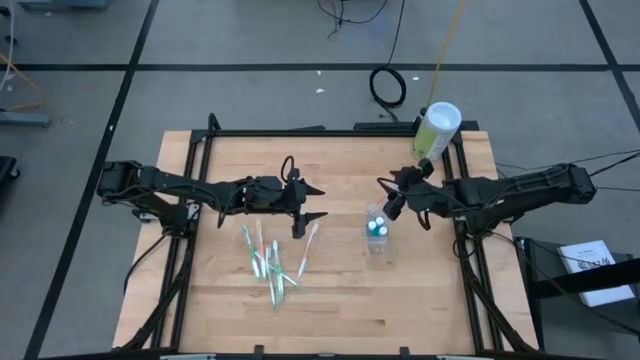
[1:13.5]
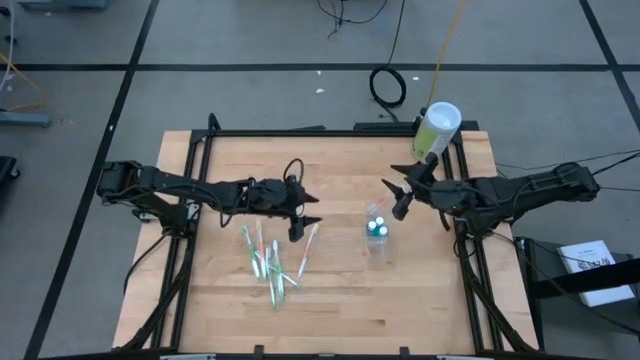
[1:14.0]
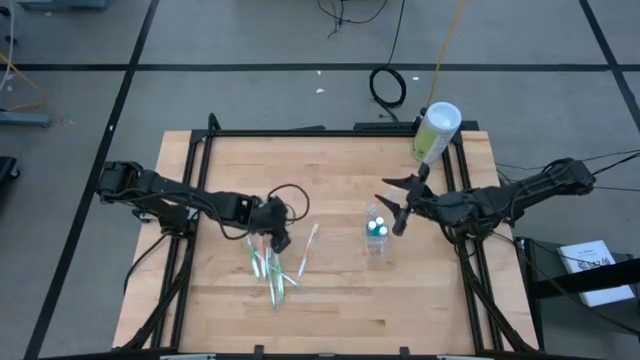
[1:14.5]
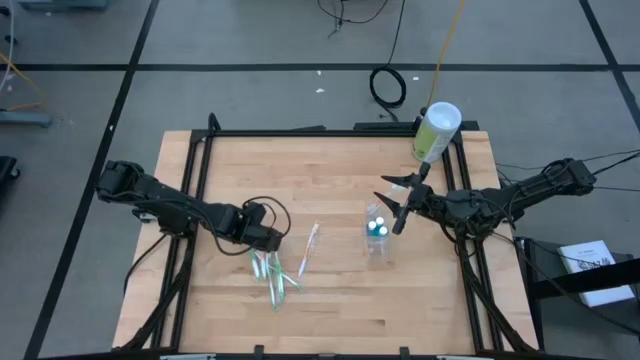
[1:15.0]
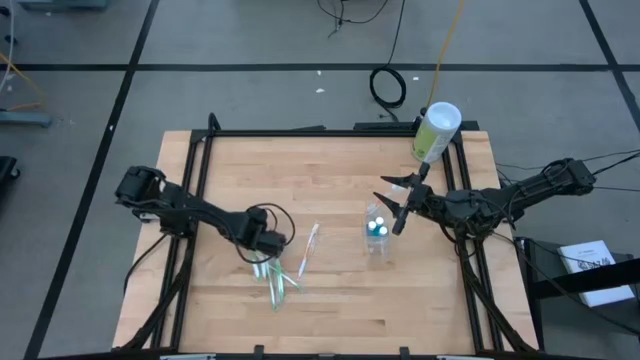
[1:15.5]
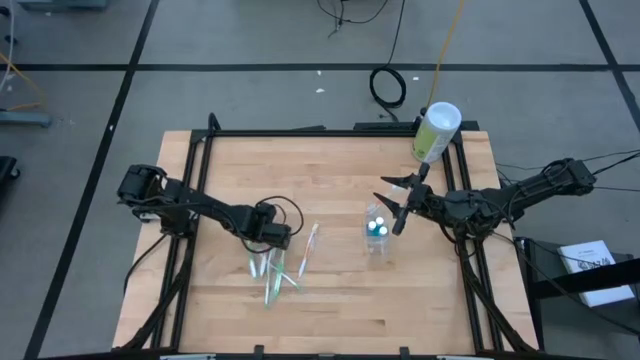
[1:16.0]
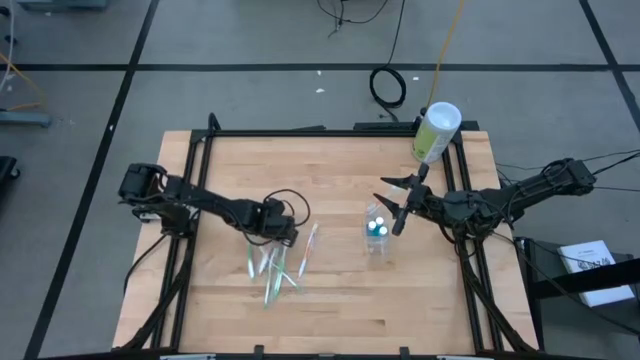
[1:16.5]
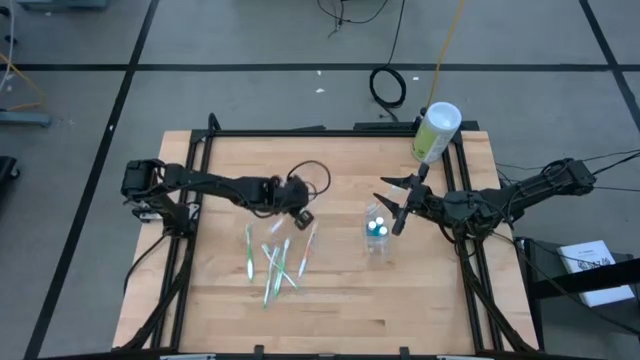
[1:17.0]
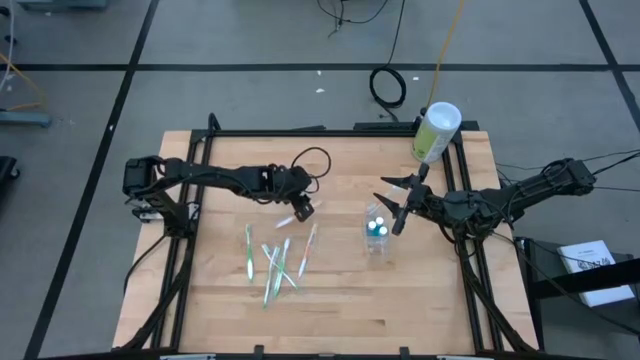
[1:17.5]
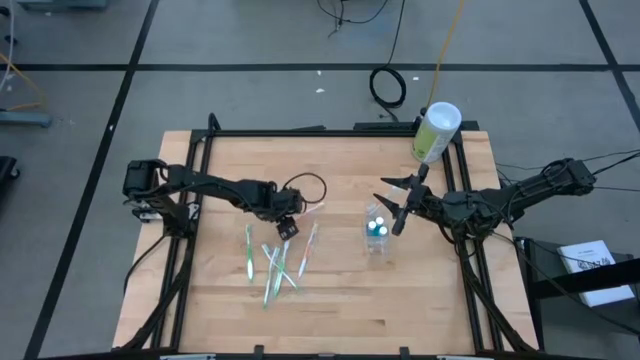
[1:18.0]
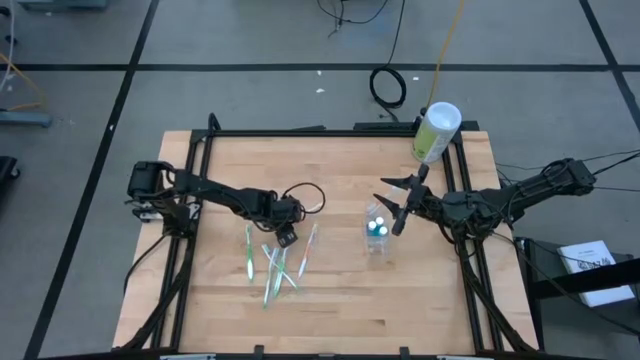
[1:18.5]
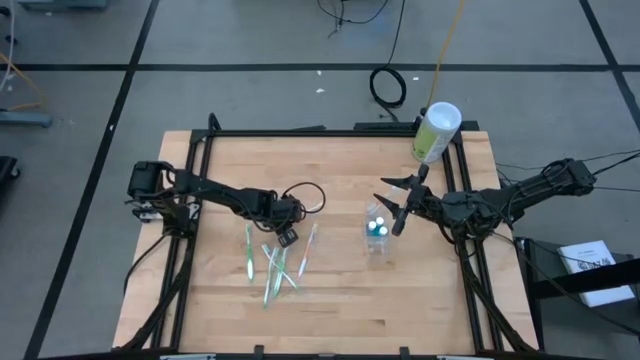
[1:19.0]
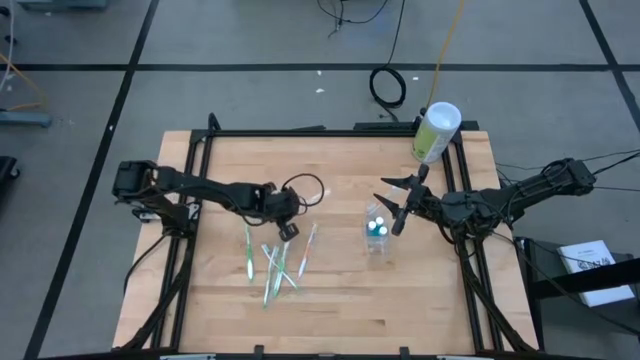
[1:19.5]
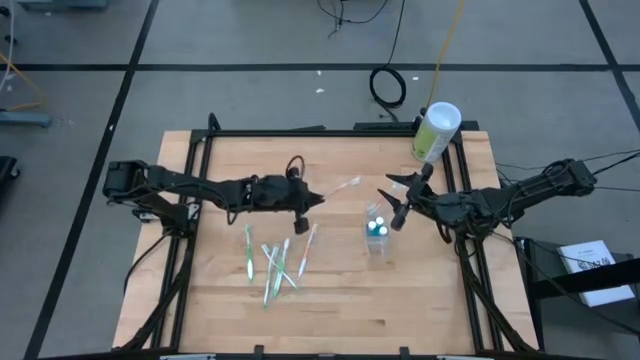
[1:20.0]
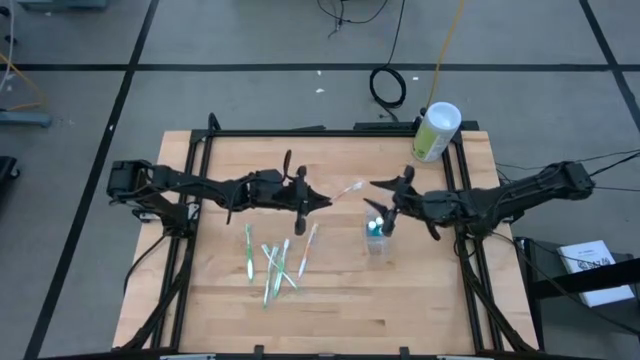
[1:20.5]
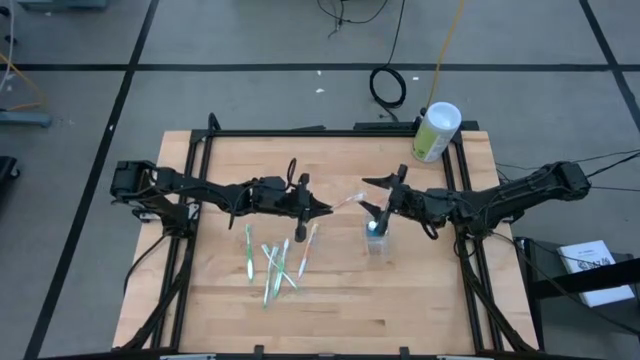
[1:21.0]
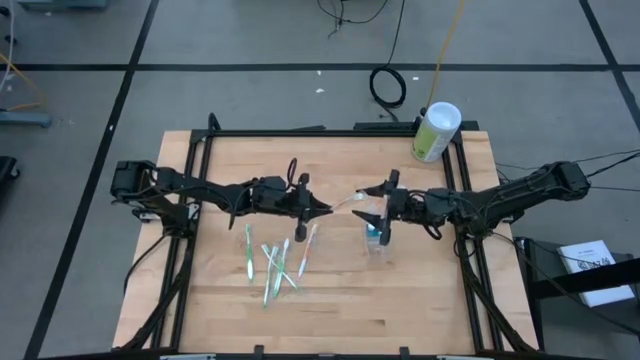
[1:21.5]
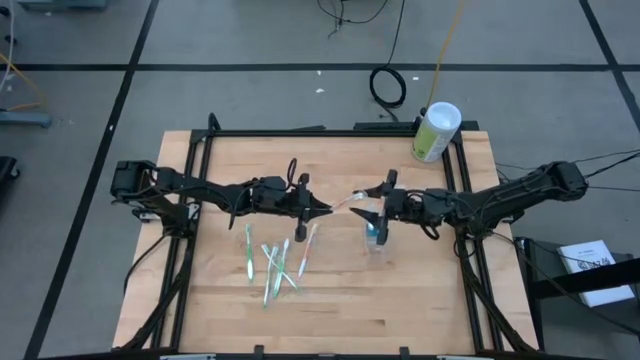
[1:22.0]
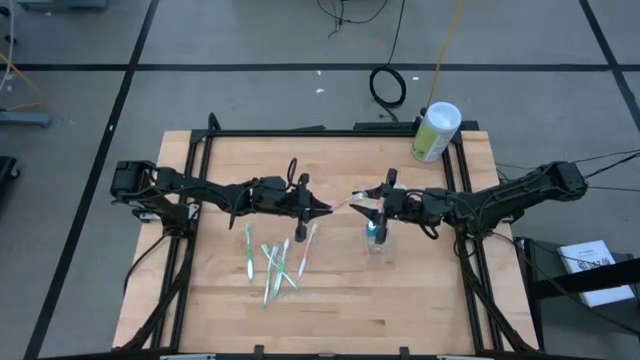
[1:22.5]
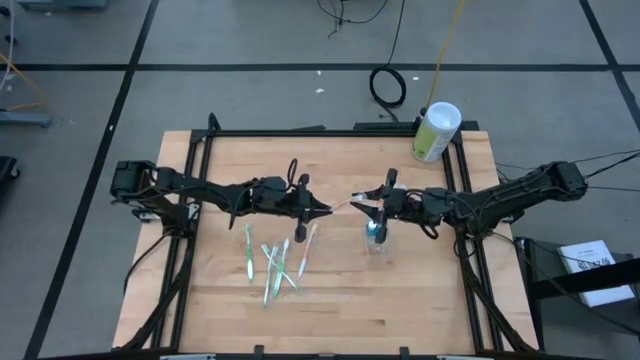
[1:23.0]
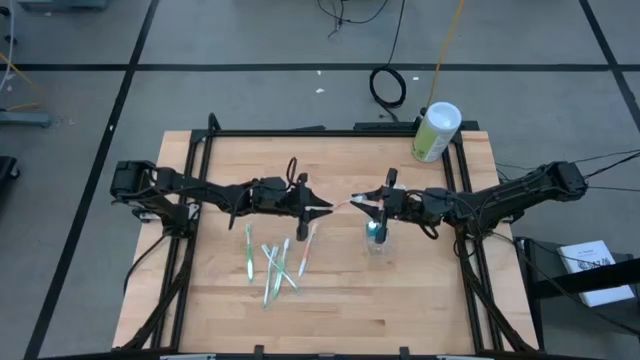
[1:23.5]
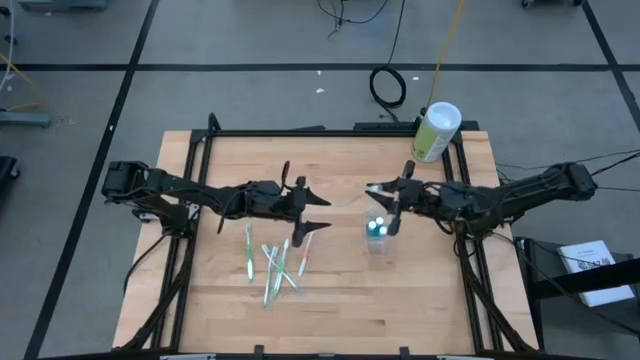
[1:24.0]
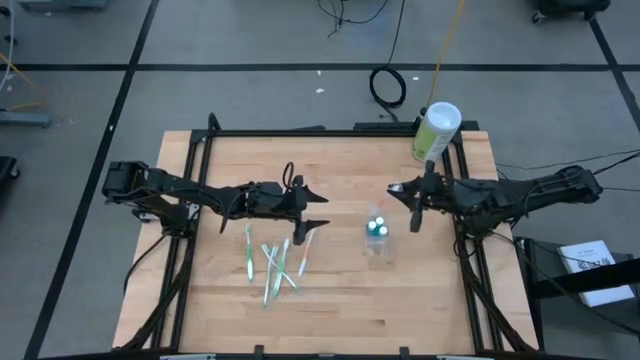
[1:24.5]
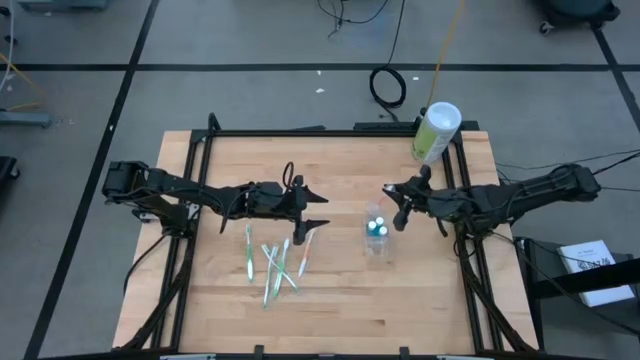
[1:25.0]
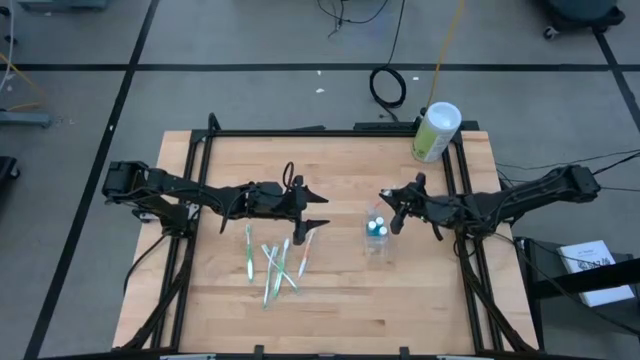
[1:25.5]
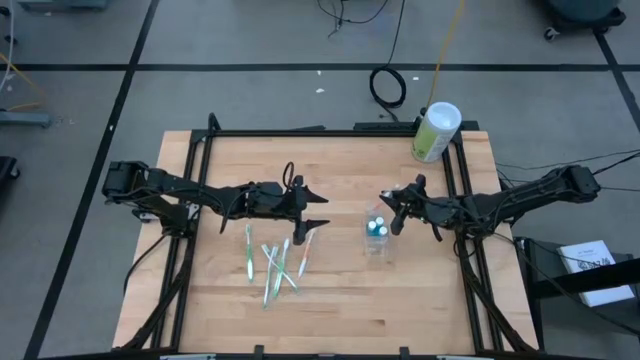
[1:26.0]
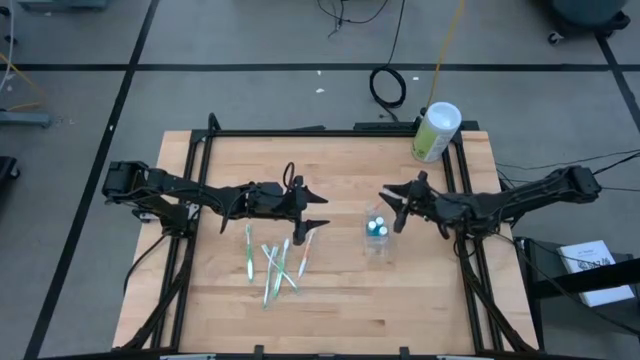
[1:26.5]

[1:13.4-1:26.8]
Task: Pick & Place toothbrushing station
Put the orange toothbrush into the top of the transparent organizer

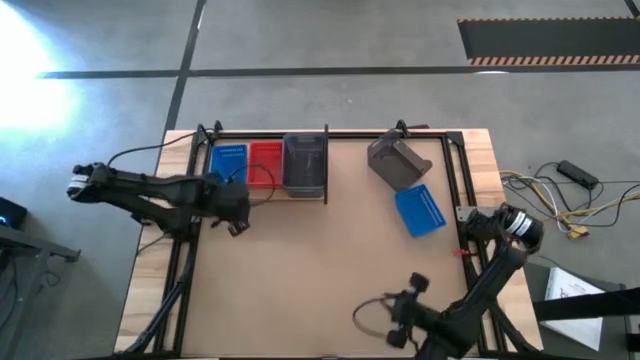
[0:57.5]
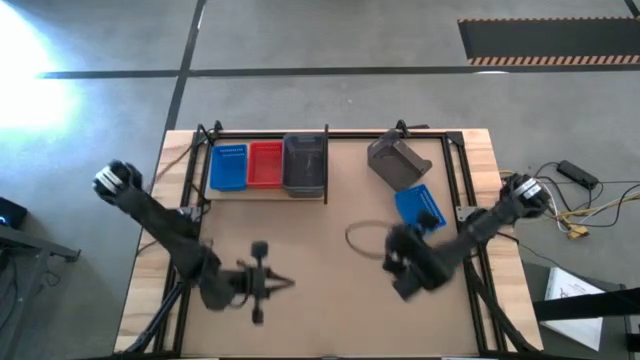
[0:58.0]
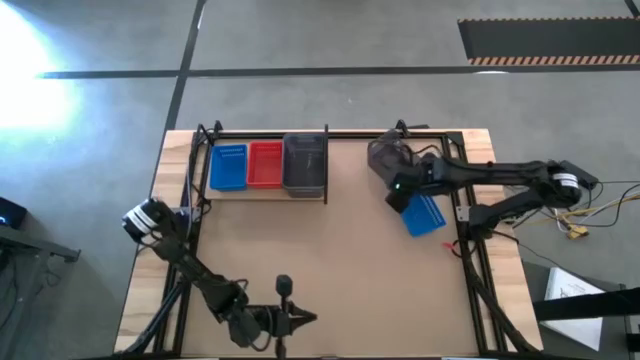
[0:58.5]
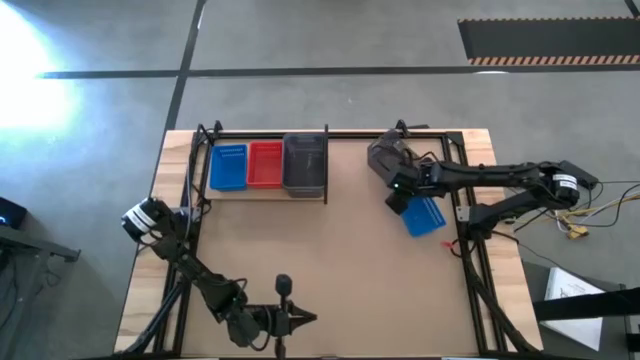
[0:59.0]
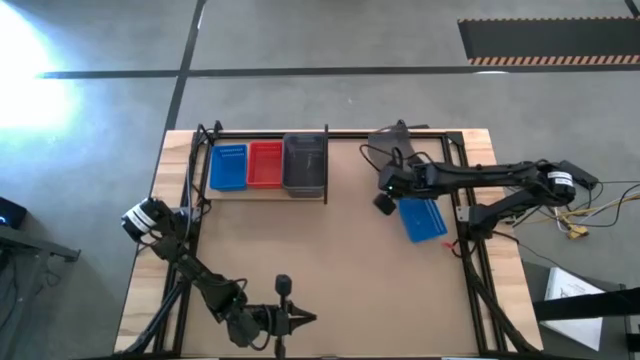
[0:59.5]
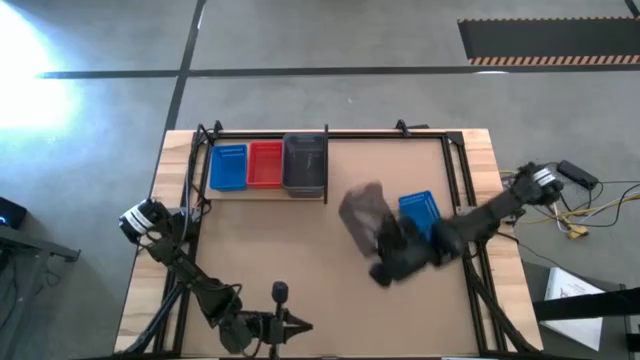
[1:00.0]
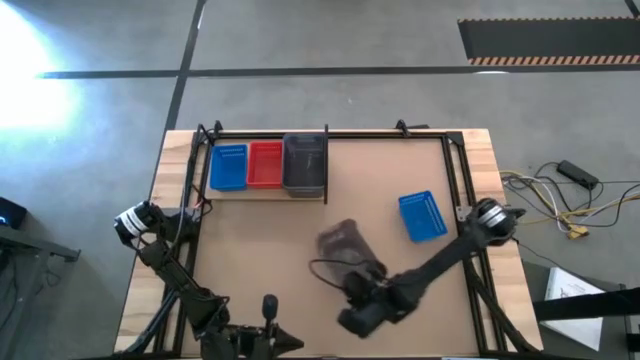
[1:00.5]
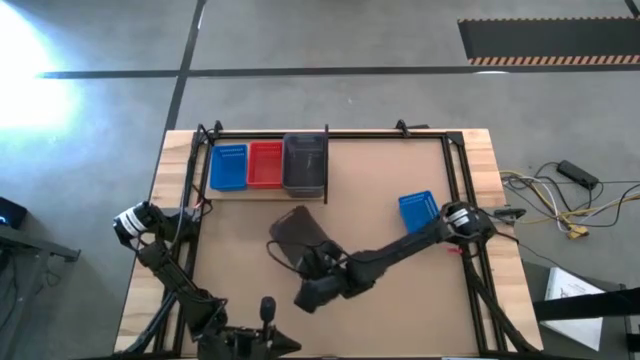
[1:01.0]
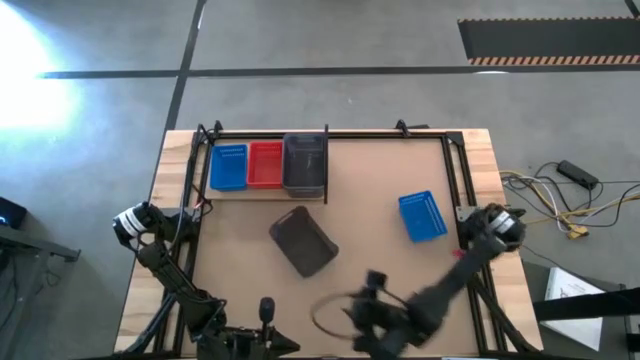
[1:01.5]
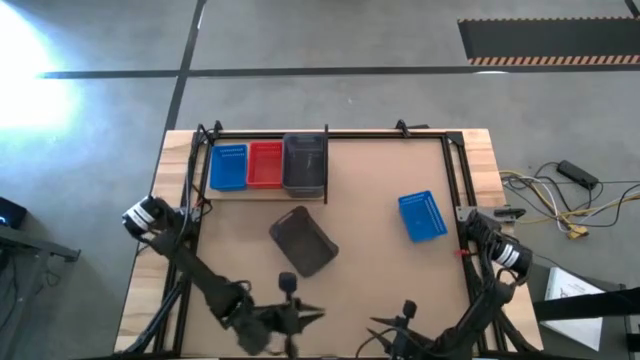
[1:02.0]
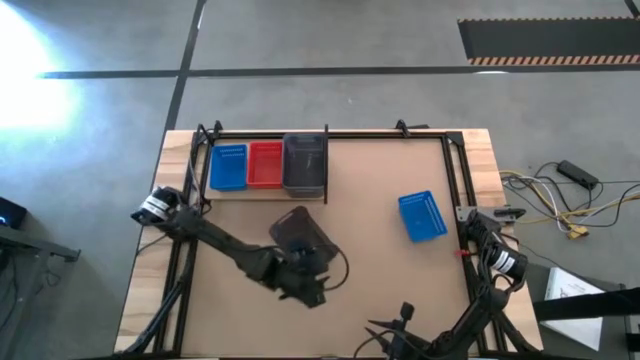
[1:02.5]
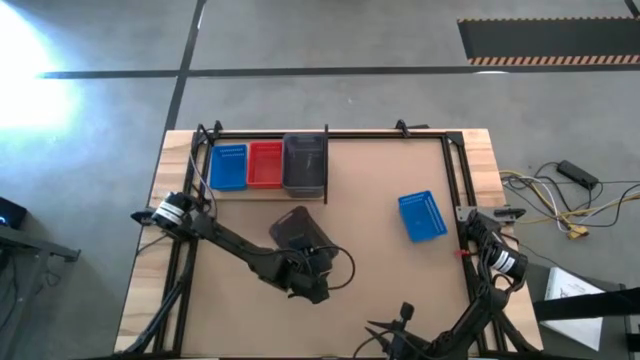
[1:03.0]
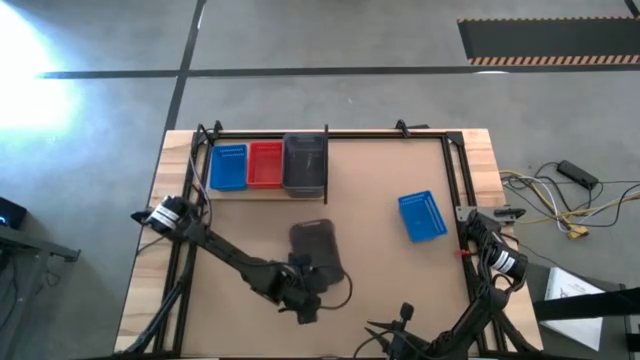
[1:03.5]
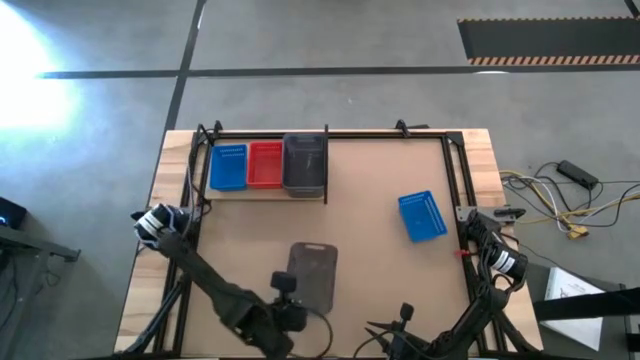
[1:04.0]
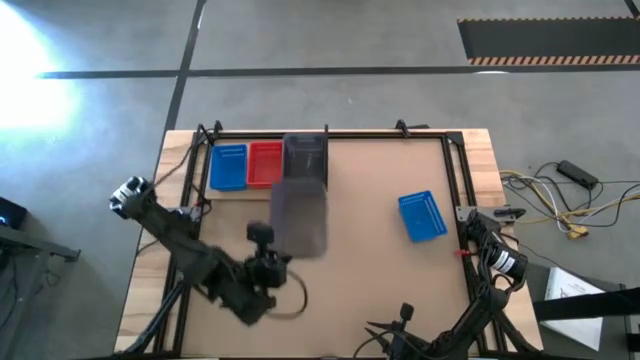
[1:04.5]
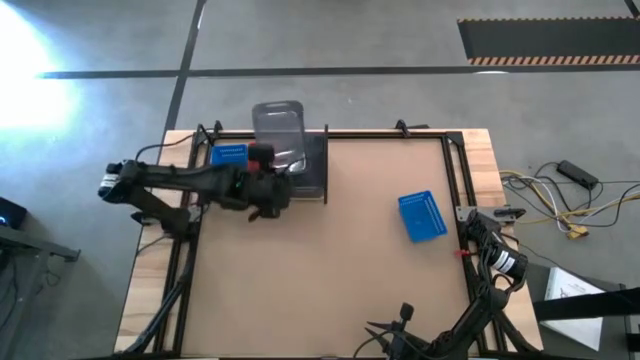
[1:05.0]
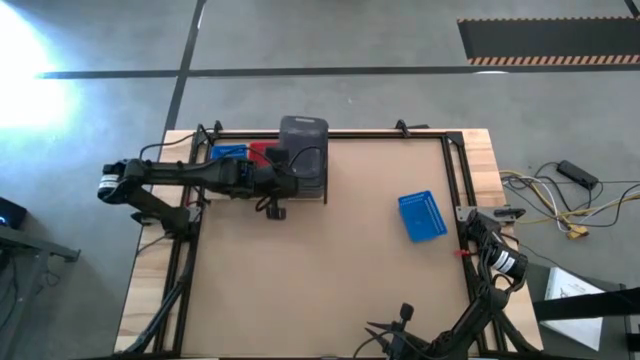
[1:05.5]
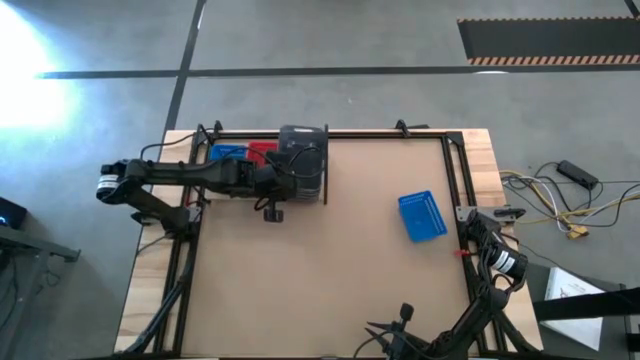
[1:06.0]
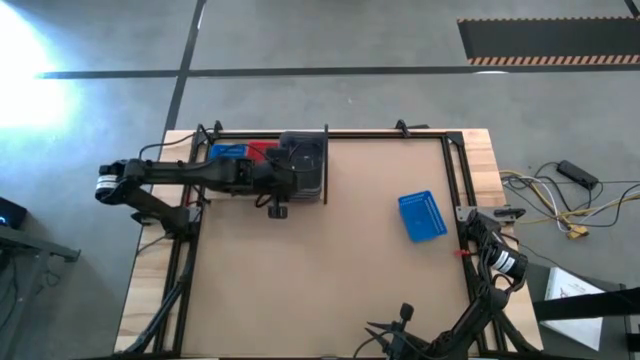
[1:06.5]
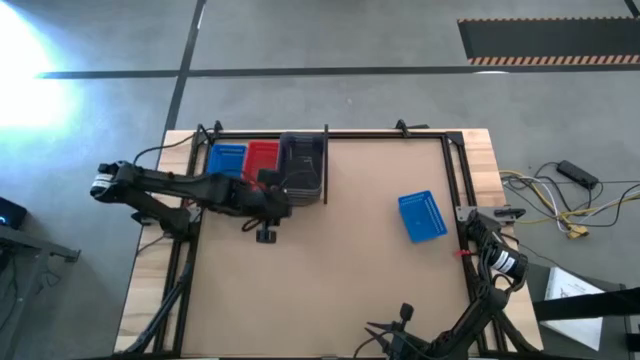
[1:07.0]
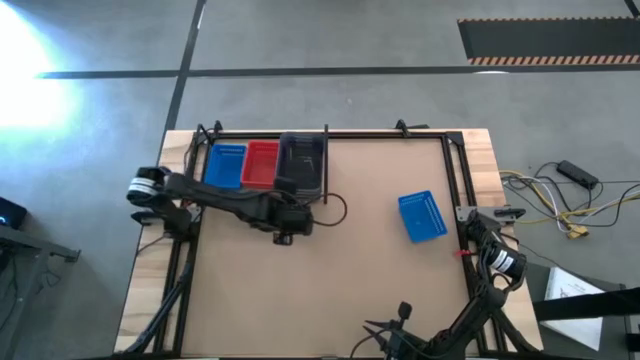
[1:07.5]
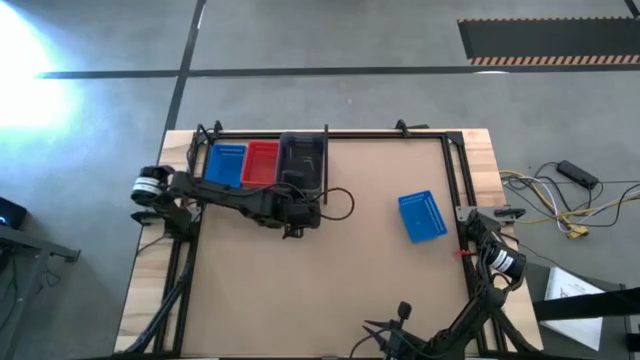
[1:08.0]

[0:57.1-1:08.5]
Task: Stack baskets on shelf by color
Stack the black bin on the stacked black bins on the shelf
